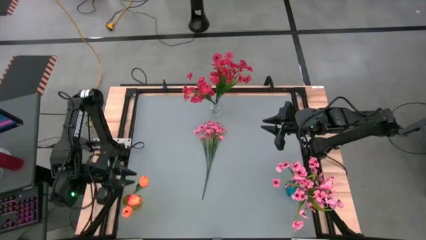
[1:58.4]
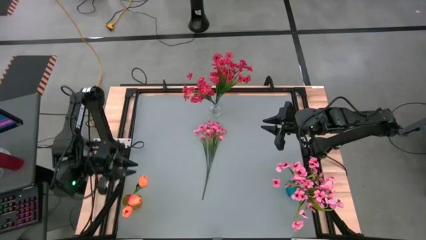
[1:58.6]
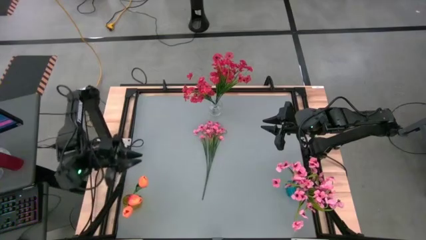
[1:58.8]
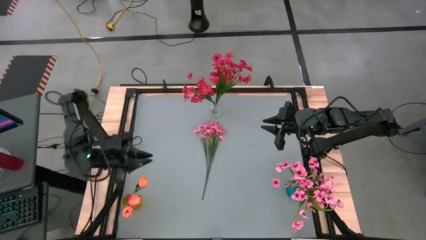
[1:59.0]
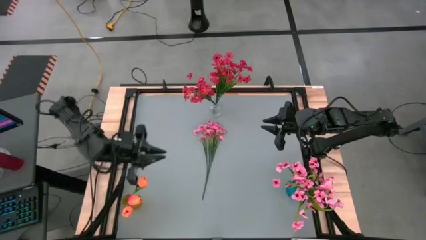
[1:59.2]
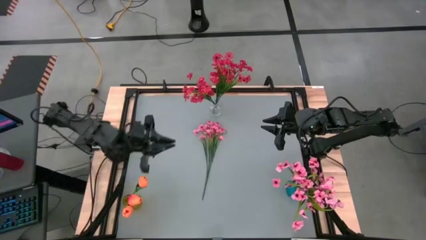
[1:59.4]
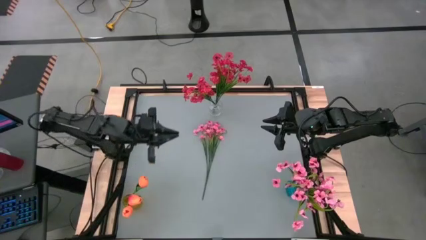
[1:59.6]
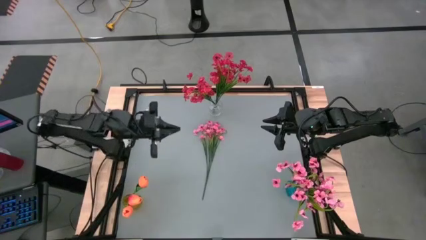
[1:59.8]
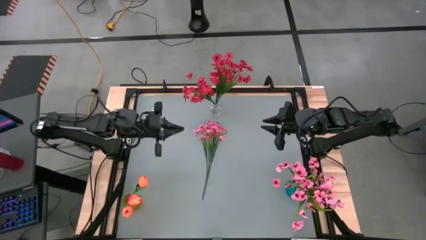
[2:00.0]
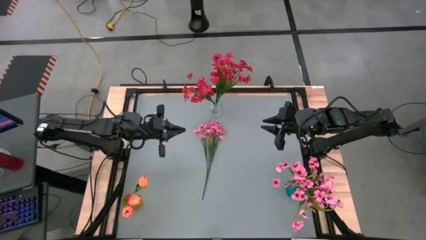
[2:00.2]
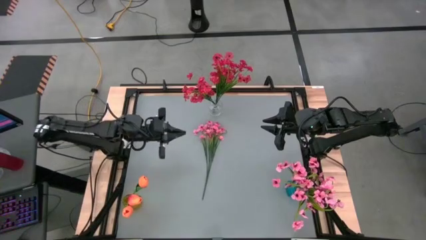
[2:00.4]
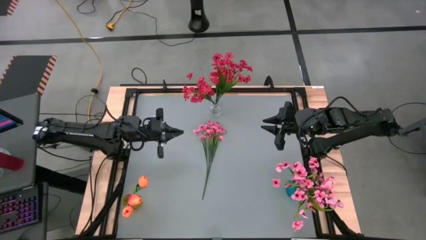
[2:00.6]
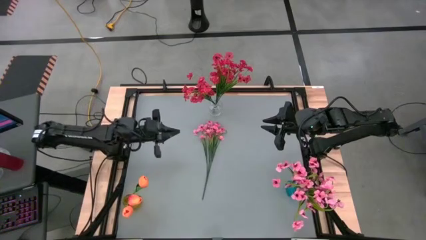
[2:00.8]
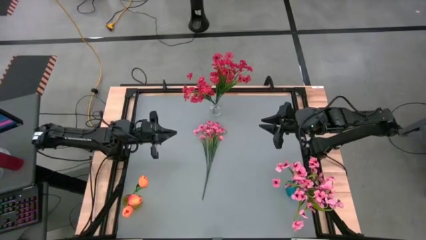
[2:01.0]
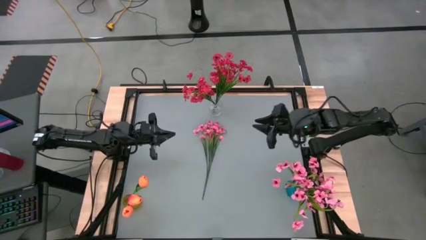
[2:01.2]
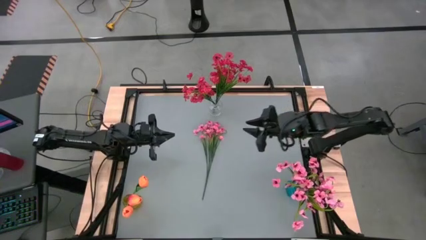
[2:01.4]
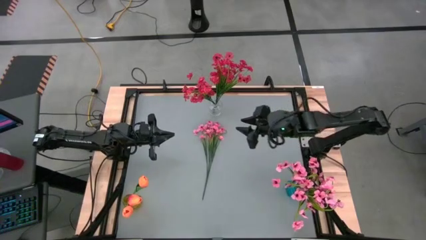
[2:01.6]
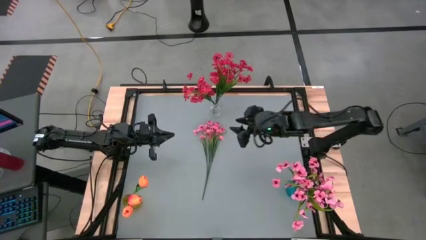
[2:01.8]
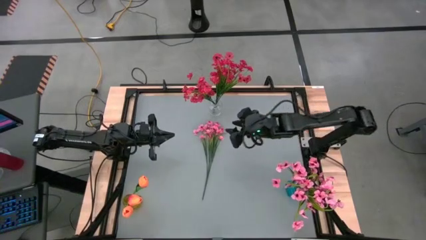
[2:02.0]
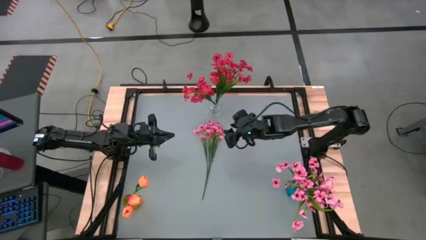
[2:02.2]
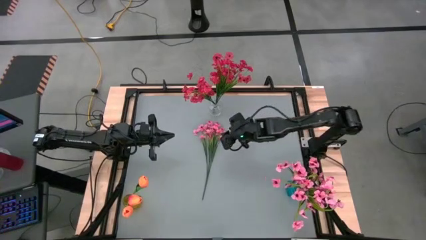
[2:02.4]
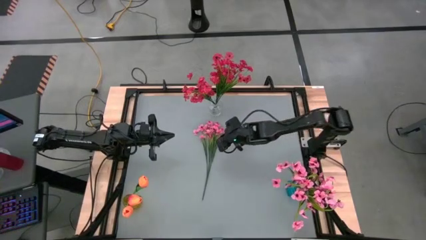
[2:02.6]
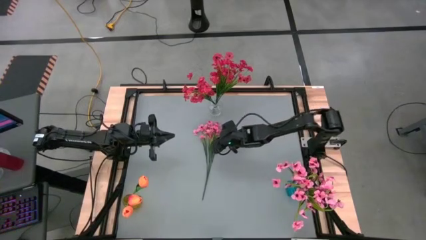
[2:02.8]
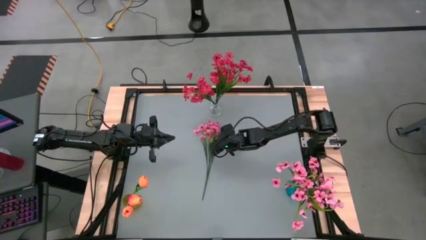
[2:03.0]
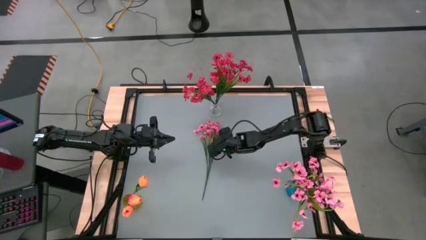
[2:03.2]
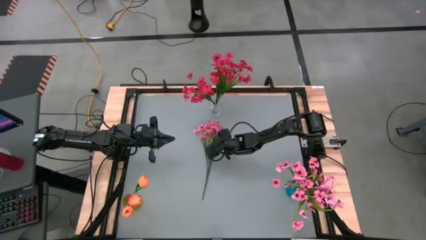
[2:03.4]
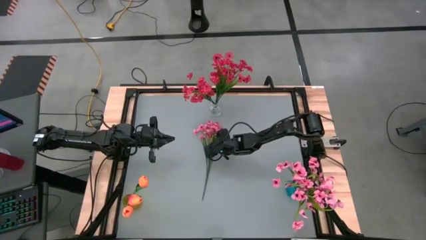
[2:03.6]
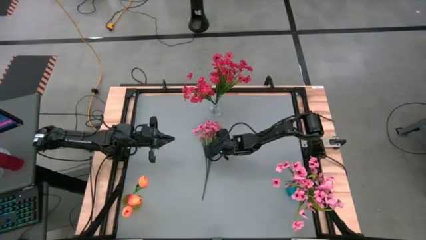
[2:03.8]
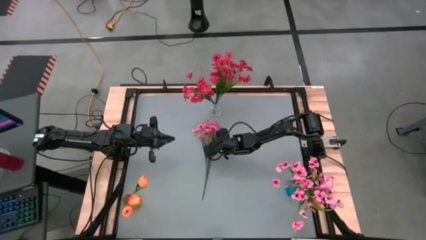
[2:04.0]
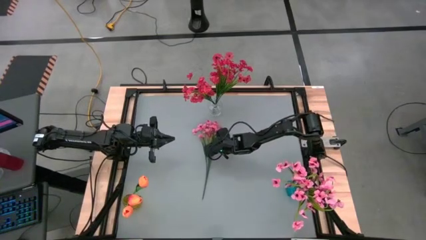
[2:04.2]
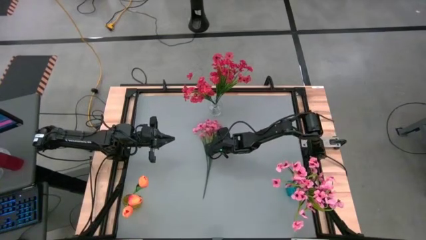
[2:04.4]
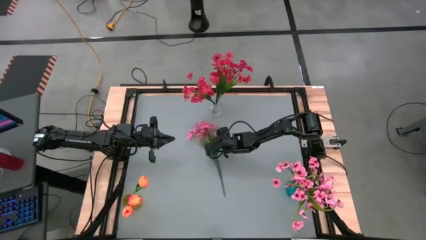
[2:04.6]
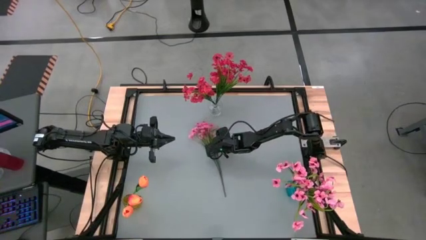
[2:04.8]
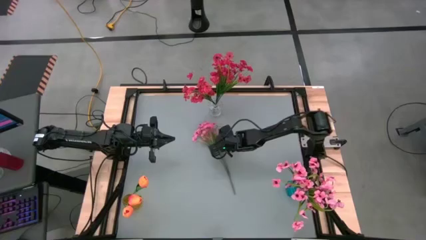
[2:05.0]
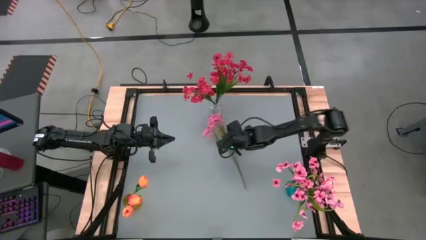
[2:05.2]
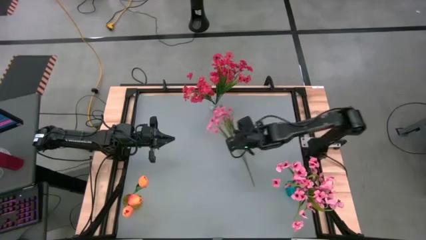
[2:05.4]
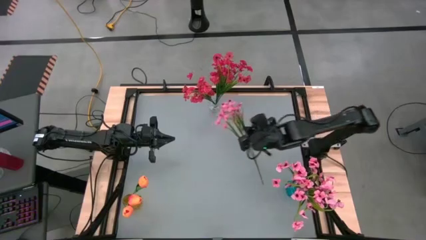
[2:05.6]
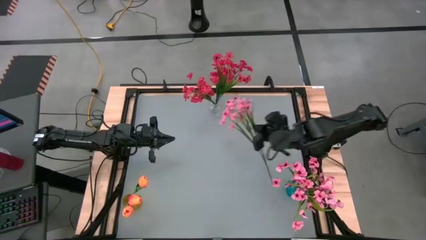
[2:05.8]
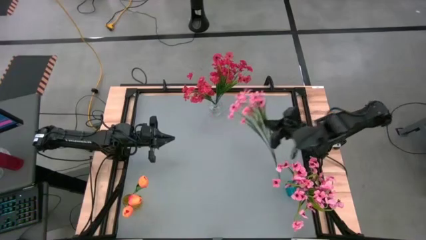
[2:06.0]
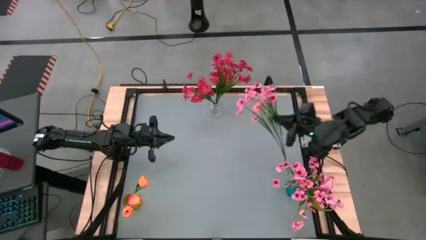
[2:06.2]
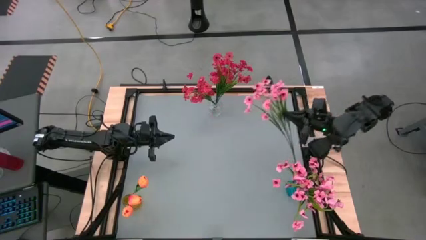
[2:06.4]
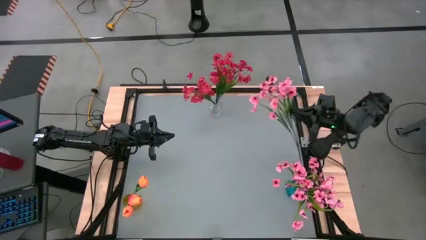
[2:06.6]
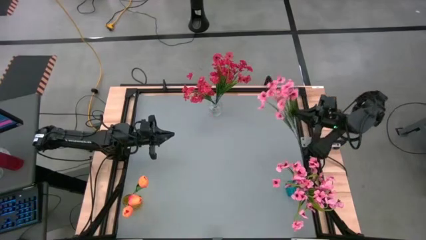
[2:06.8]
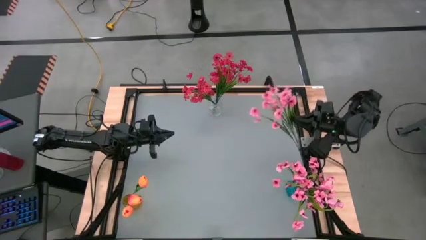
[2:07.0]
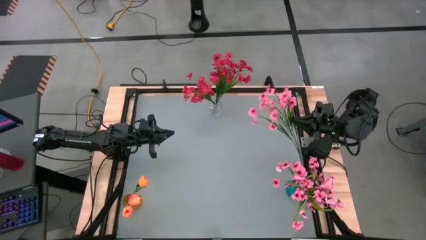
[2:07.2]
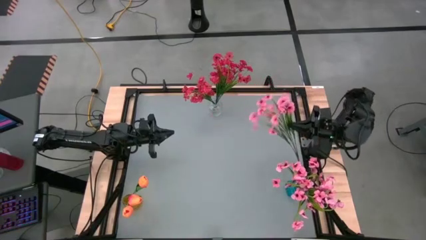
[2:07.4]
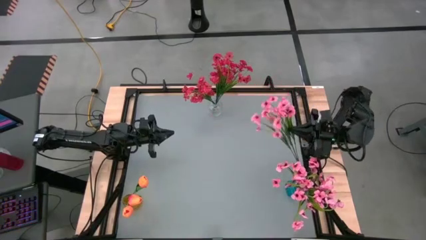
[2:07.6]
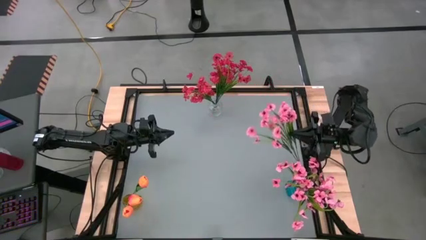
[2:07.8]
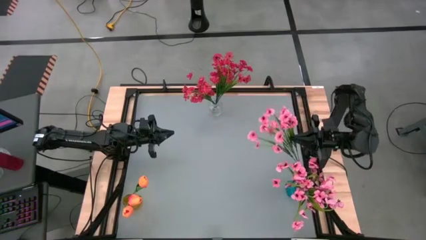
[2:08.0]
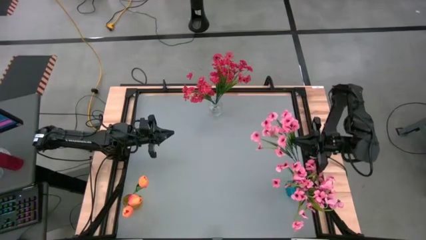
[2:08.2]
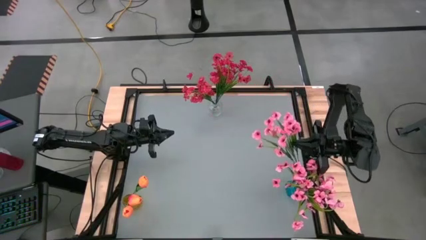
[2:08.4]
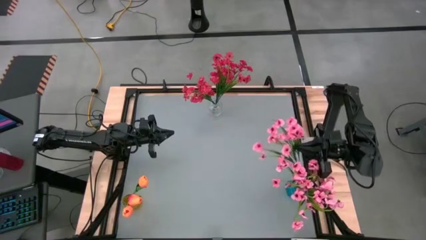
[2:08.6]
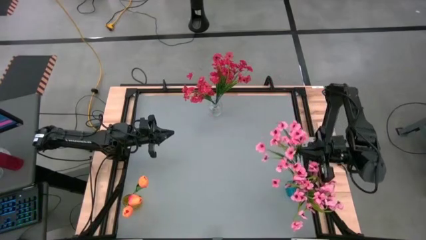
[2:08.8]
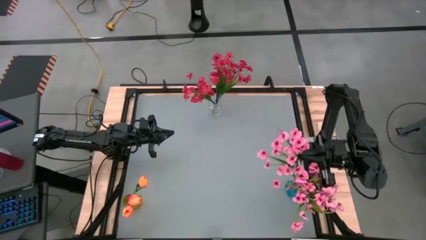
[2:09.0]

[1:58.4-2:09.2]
Task: Sort flowers into vase by color
Put the pink flowers into the blue vase

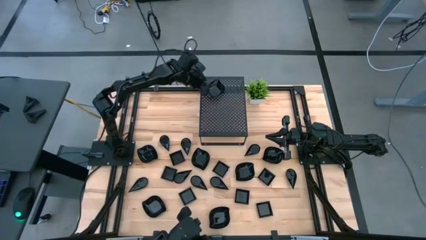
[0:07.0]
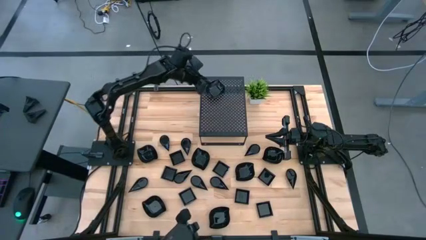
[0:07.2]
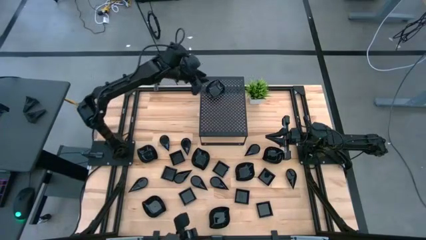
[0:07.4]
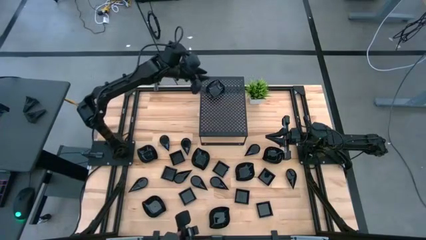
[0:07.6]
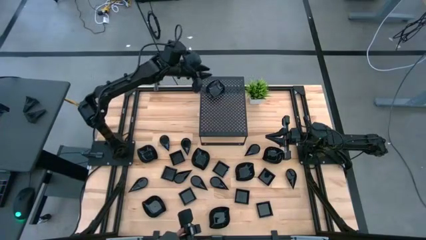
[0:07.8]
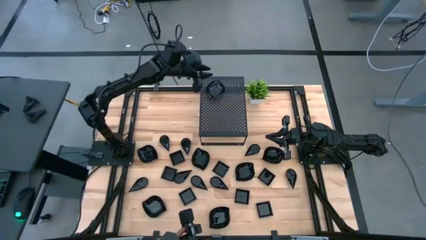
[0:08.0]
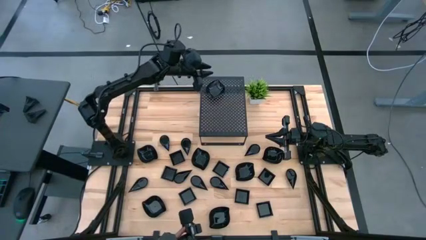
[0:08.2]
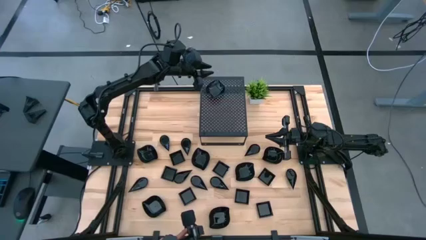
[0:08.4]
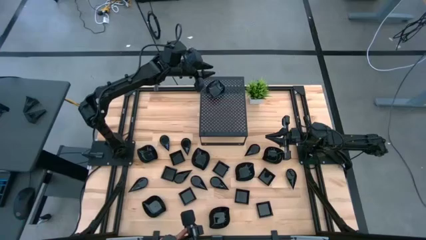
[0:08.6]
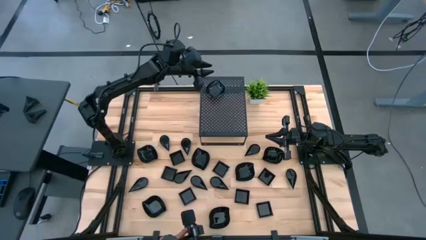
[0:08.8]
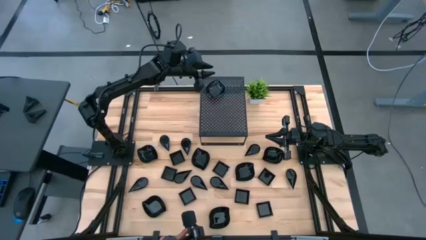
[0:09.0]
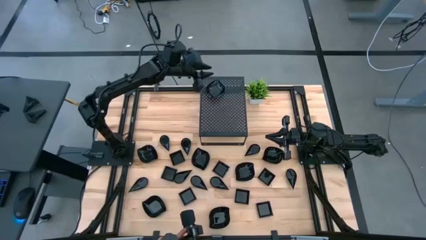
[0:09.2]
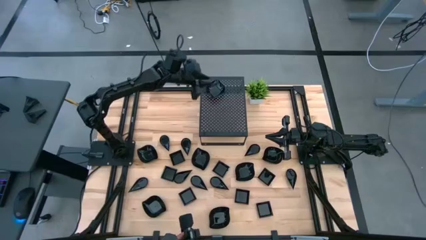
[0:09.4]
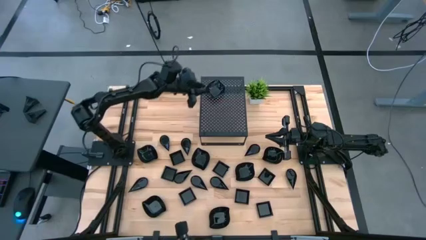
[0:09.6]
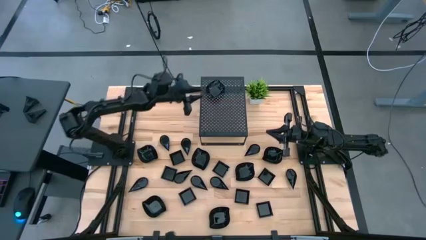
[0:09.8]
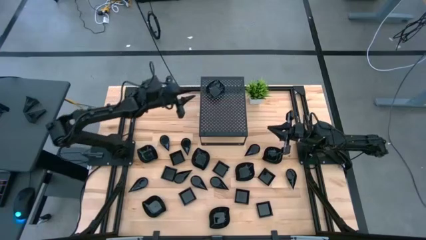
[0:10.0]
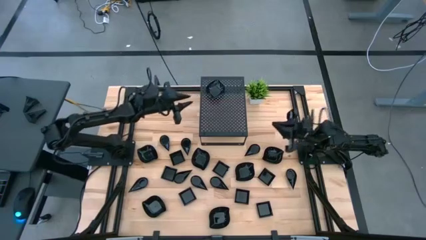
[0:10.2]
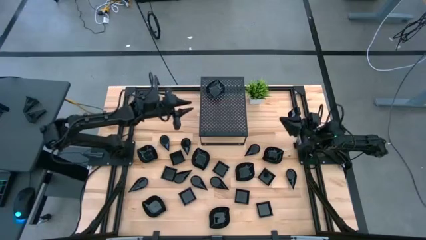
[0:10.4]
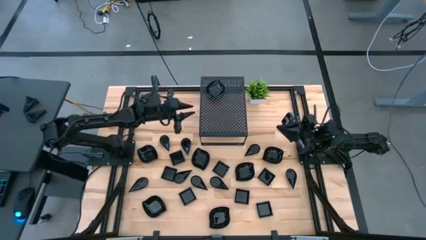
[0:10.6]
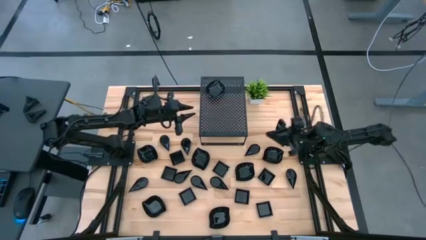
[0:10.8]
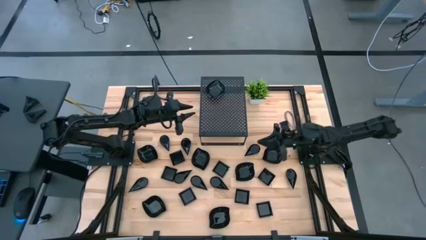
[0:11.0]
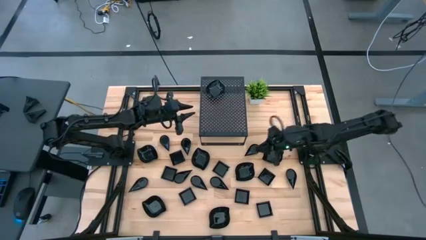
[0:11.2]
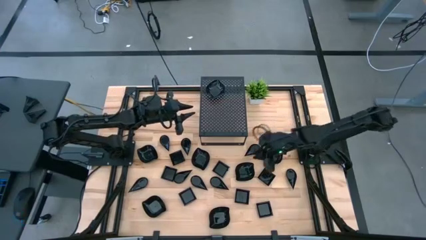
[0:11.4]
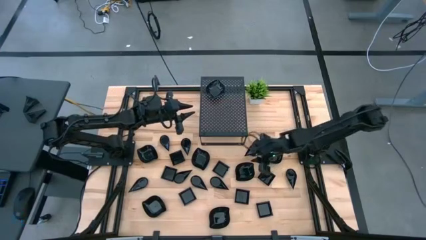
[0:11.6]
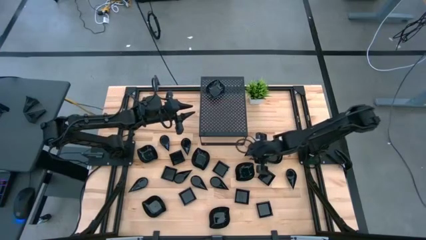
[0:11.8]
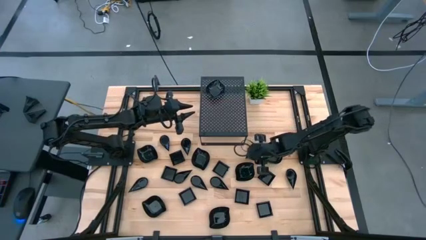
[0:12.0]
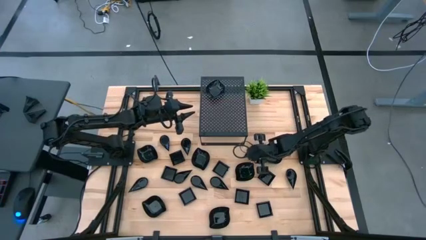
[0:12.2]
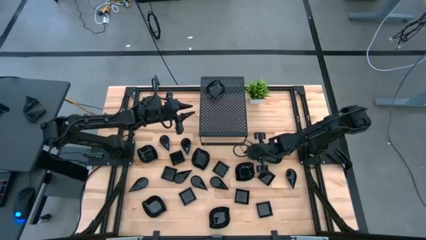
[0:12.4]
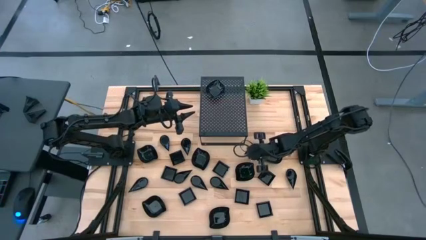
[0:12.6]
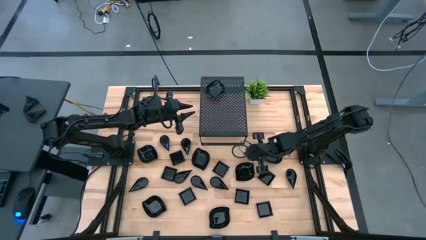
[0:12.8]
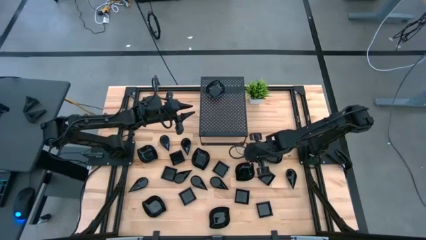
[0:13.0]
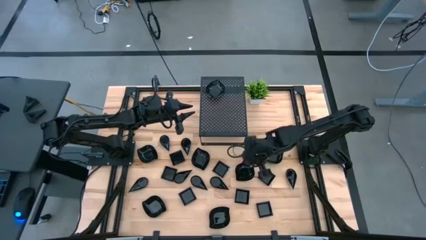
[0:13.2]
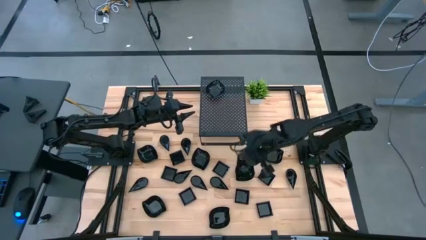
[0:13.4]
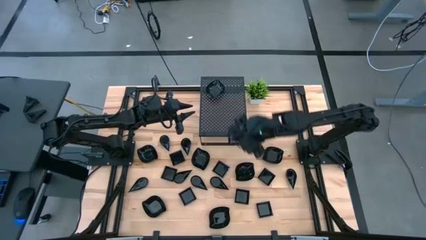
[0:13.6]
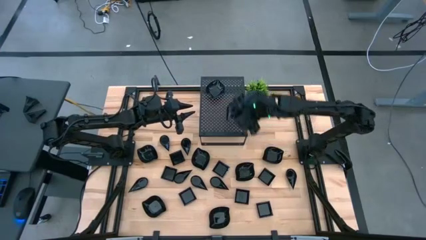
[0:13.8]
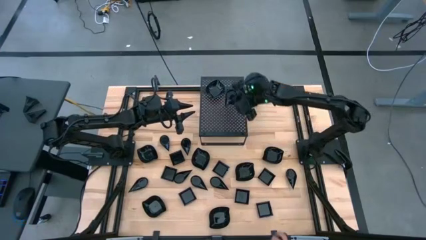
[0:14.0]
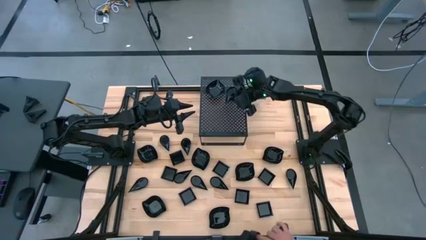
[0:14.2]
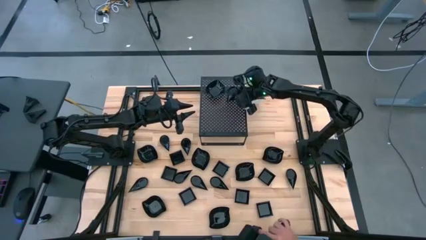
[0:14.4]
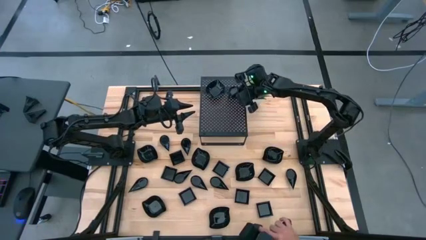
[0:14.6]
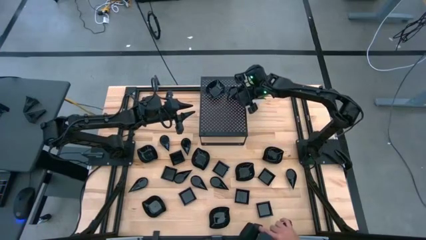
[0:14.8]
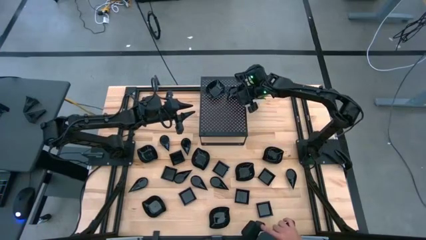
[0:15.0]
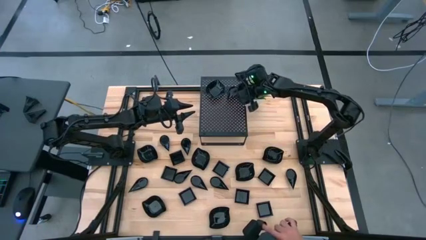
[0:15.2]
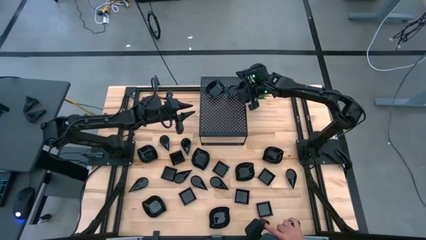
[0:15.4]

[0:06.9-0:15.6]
Task: Pick & Place Mini shaped plates
Put the black drop-shaped plate on the shelf
